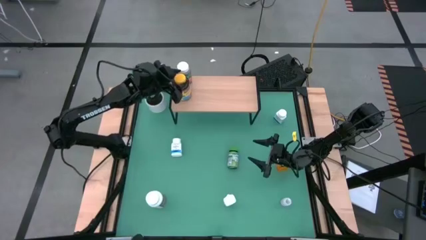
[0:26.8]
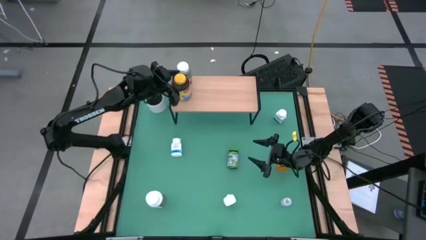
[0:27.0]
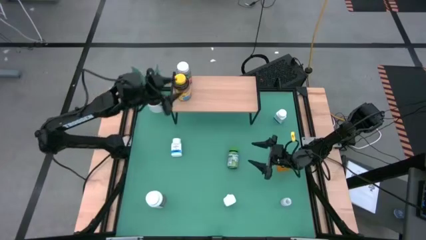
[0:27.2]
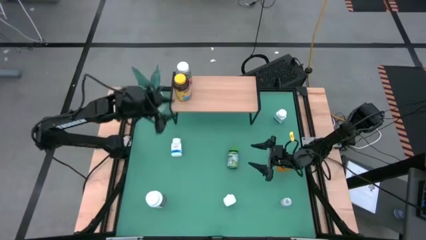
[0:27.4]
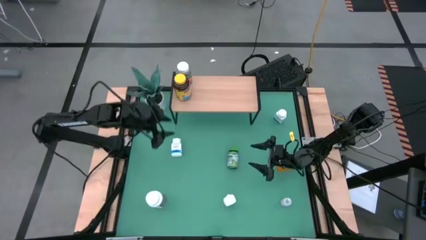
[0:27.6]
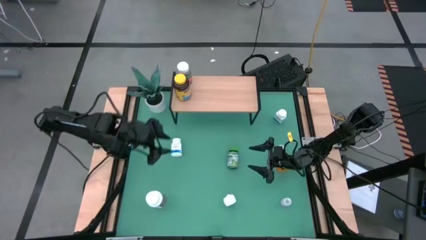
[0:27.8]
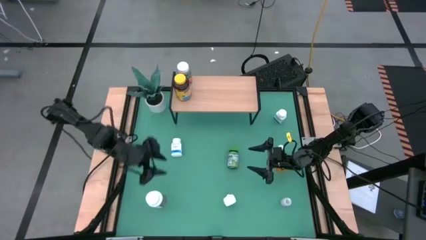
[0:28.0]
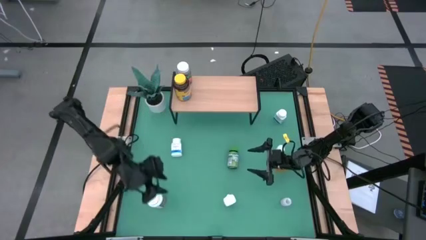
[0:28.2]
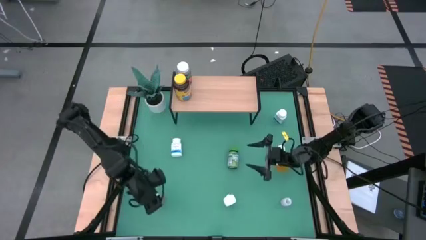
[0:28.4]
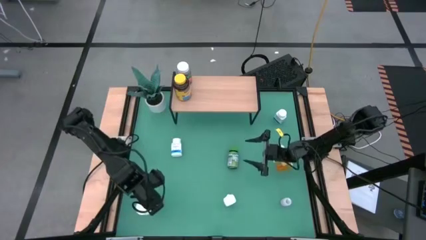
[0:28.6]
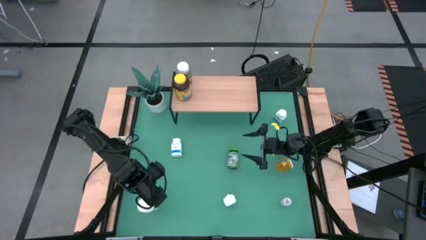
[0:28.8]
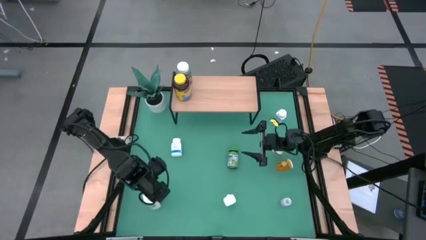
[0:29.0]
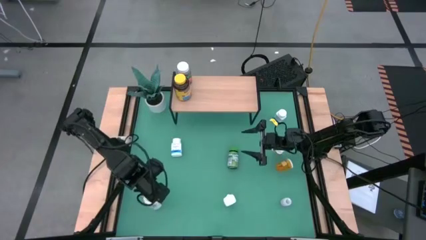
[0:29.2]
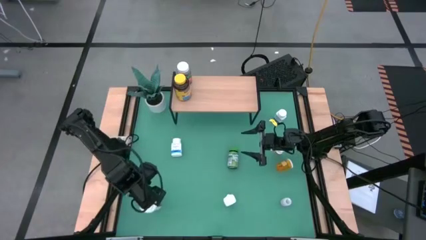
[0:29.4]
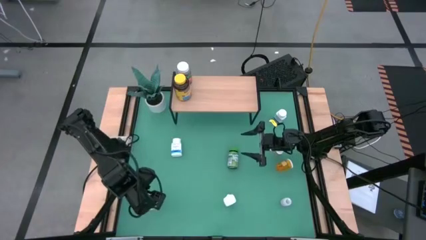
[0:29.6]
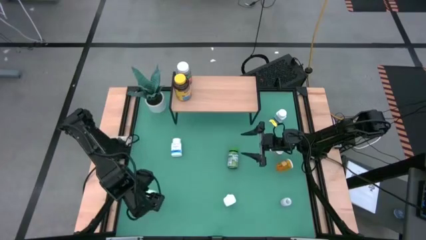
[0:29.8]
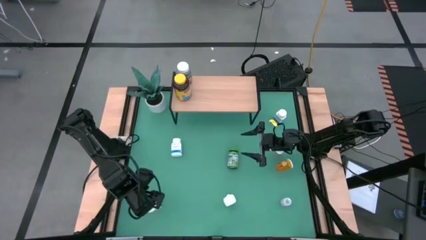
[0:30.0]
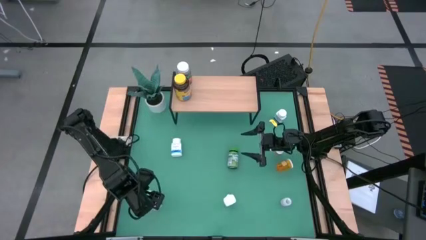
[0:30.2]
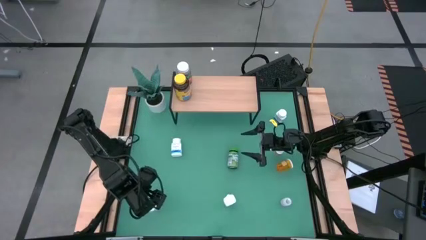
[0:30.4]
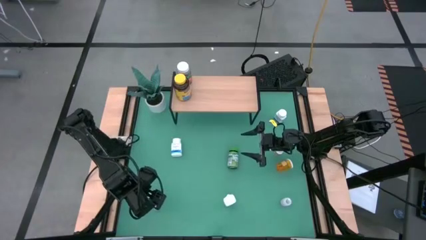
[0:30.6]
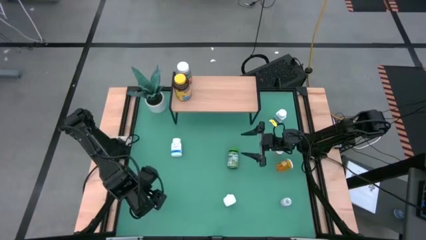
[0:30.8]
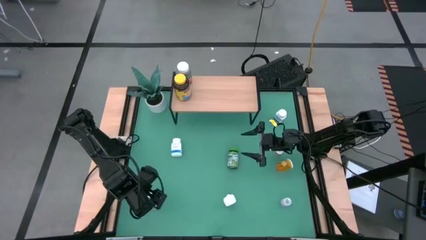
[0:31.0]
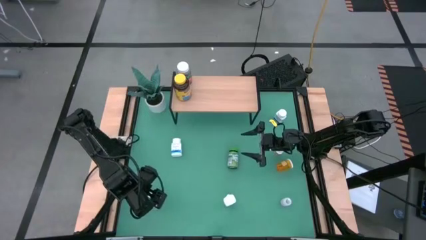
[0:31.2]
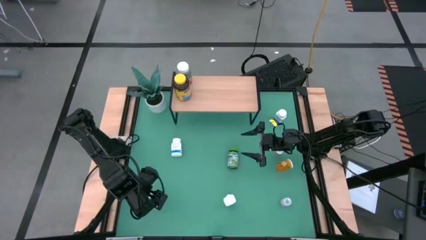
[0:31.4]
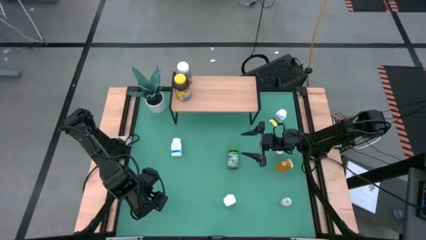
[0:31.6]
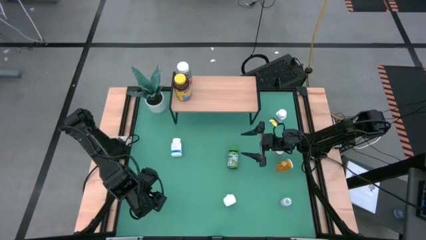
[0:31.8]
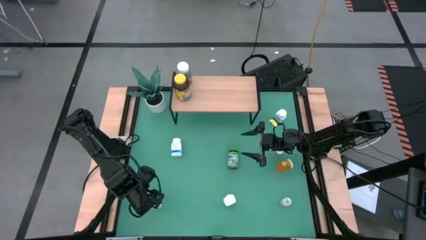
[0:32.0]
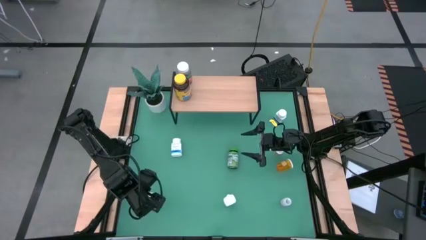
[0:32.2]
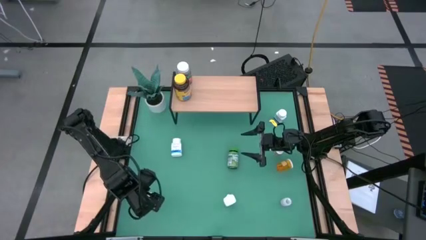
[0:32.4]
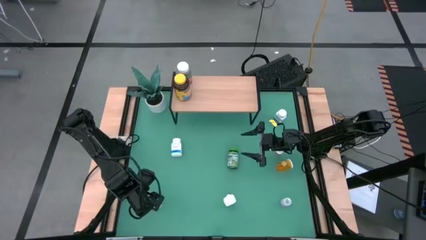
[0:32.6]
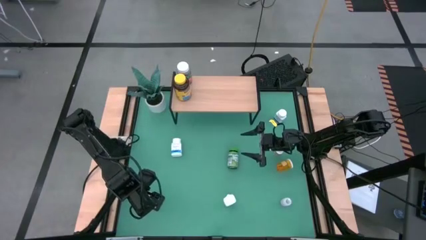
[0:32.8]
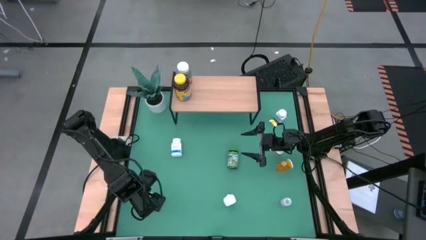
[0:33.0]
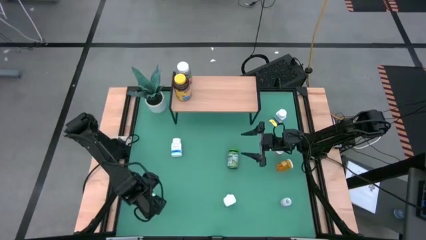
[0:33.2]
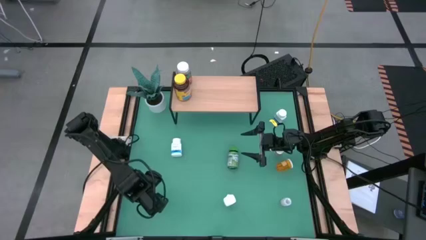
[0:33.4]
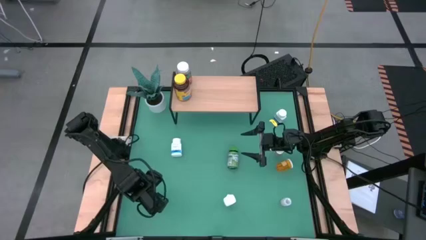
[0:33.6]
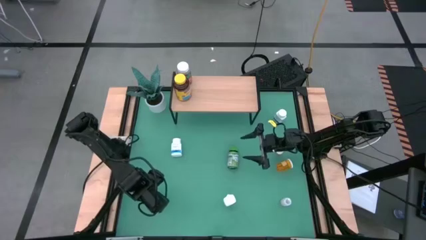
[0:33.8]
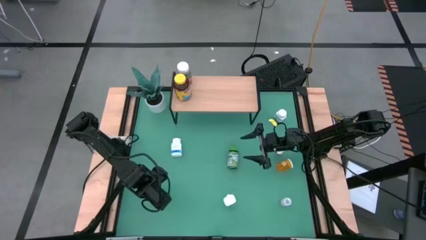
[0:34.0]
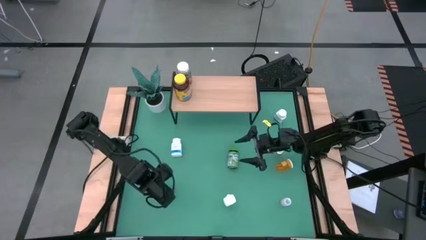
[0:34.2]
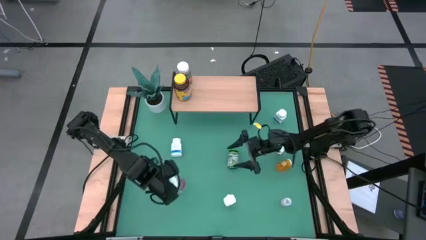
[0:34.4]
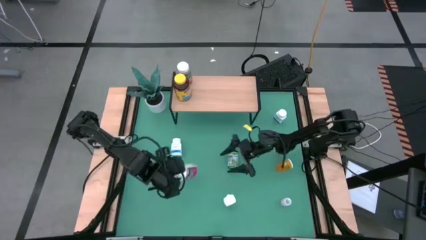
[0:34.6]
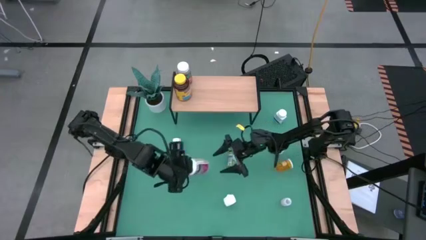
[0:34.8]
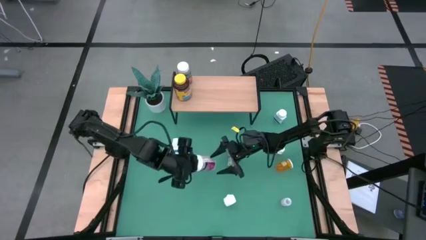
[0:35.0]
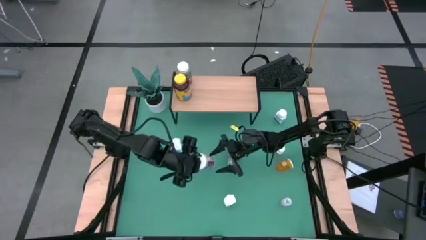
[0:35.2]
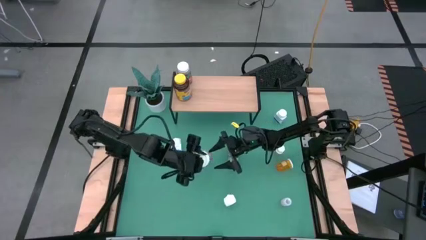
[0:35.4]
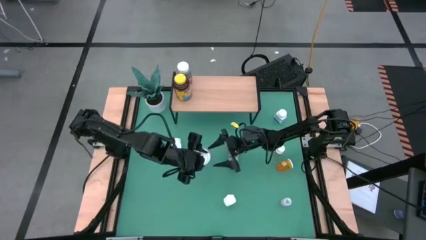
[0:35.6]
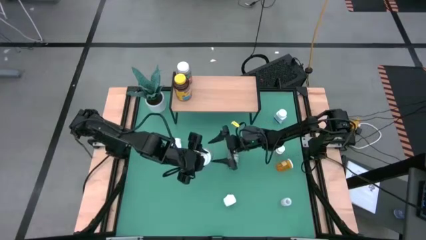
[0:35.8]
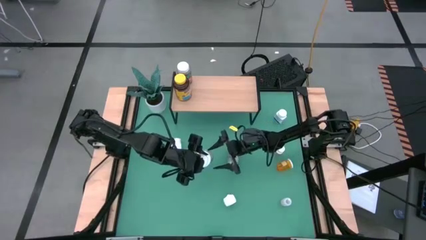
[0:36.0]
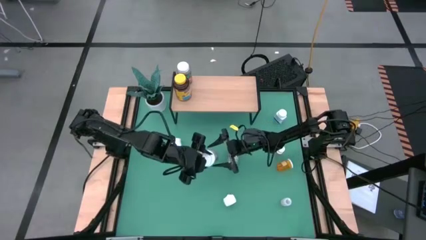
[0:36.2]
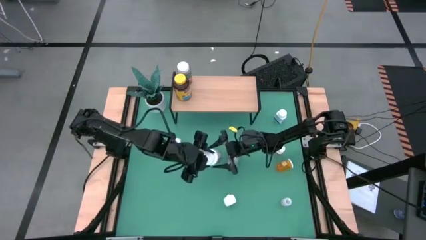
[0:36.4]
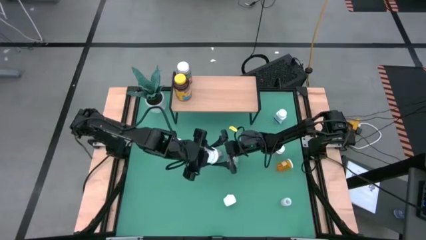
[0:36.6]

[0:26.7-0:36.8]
Task: Pick and place medicine bottles onto shelf by color
Put the violet pill bottle on the shelf
